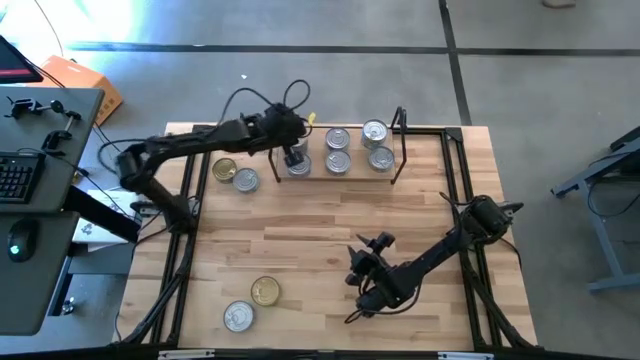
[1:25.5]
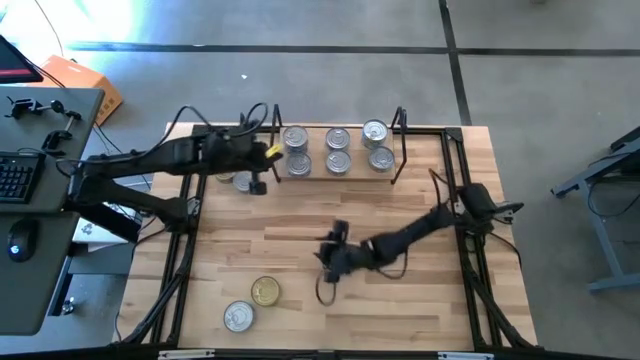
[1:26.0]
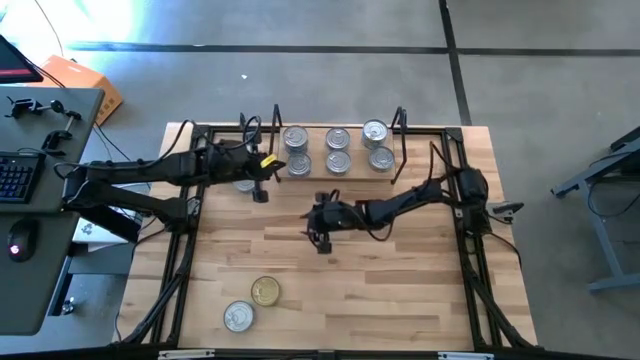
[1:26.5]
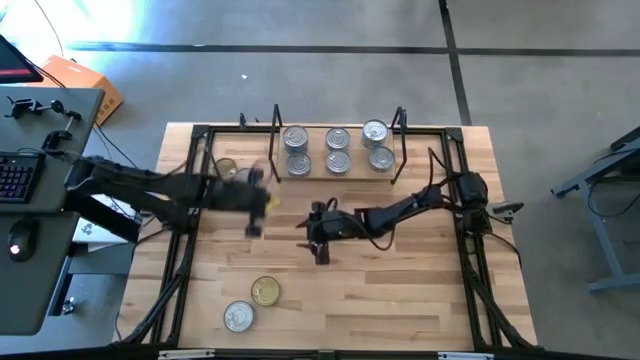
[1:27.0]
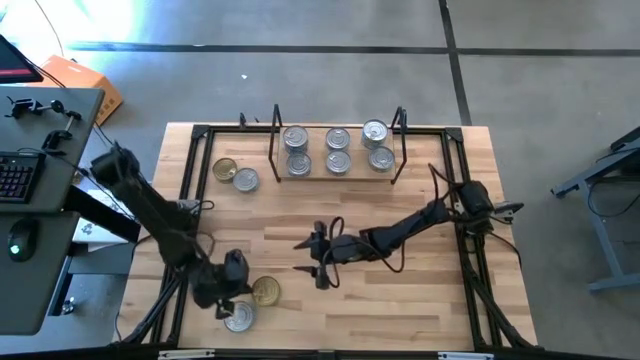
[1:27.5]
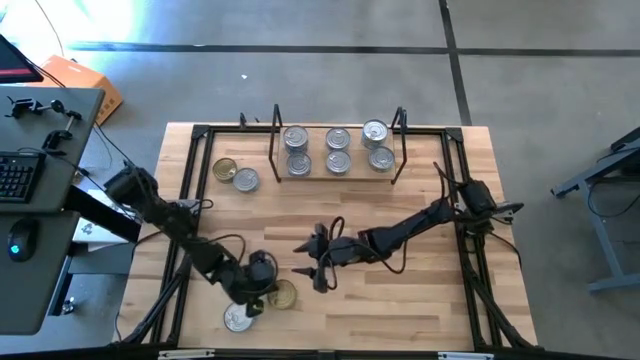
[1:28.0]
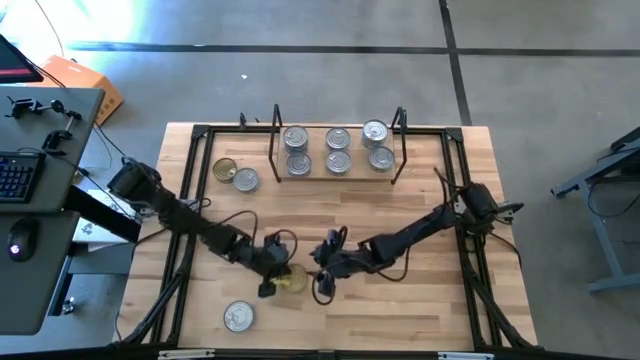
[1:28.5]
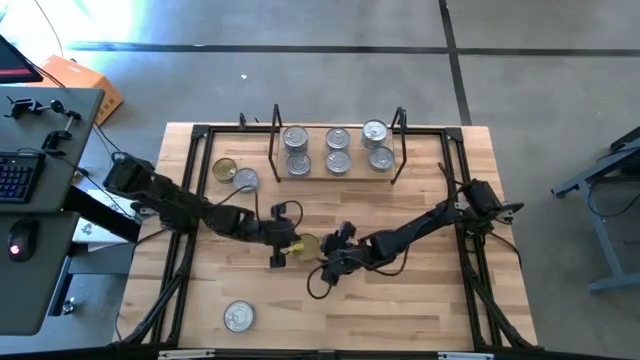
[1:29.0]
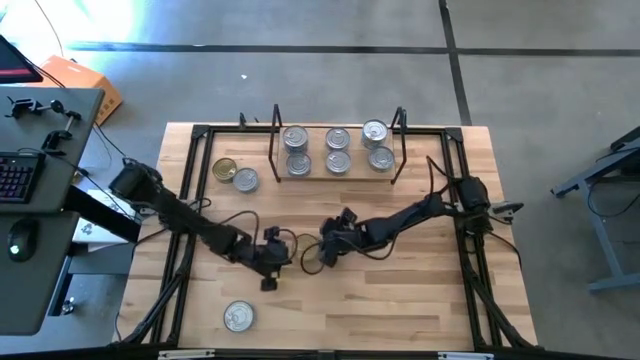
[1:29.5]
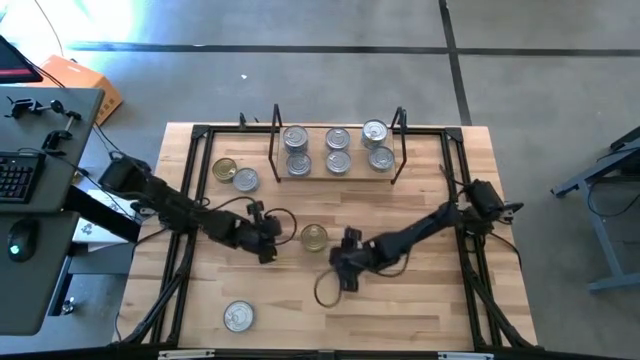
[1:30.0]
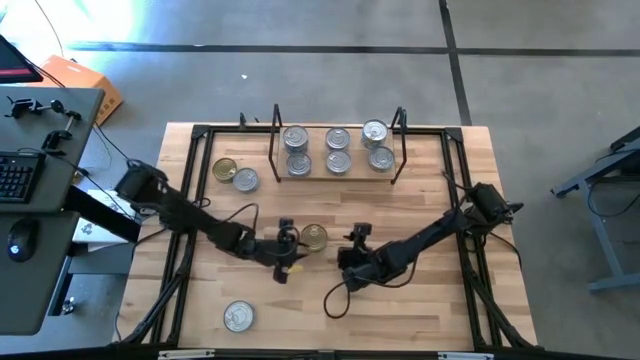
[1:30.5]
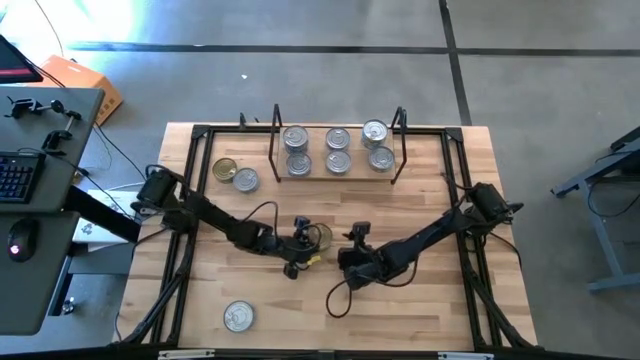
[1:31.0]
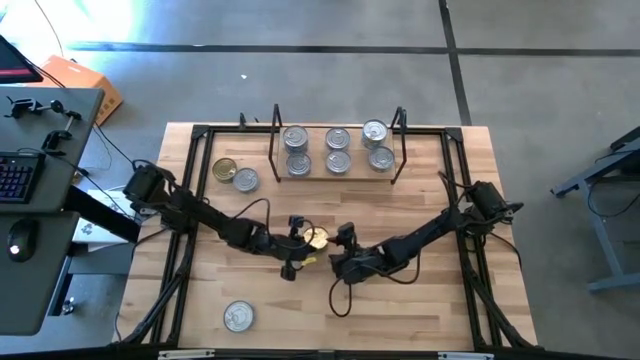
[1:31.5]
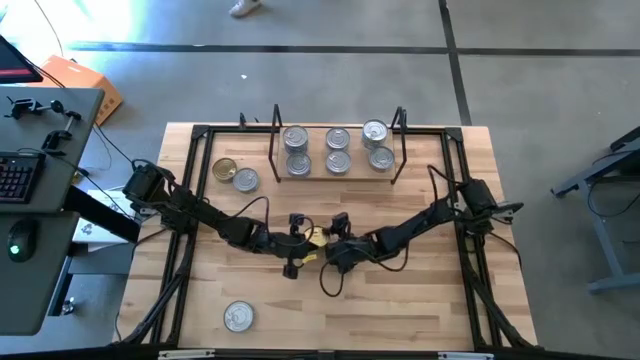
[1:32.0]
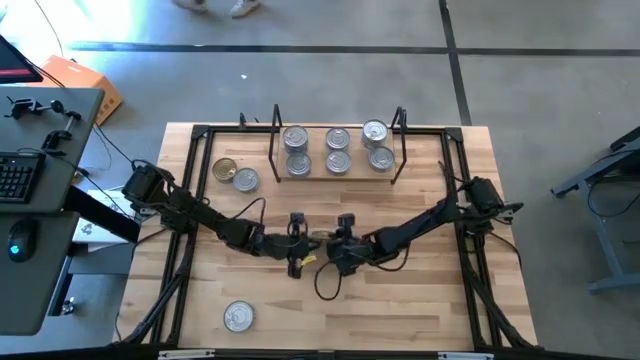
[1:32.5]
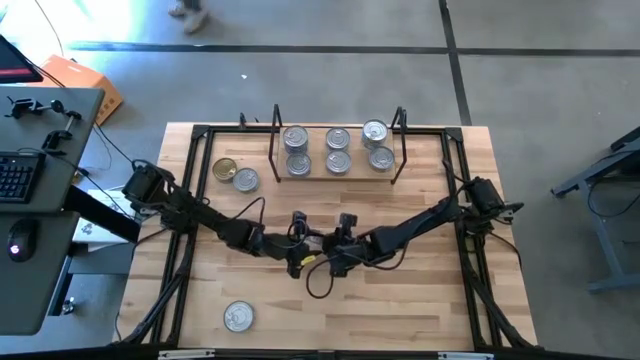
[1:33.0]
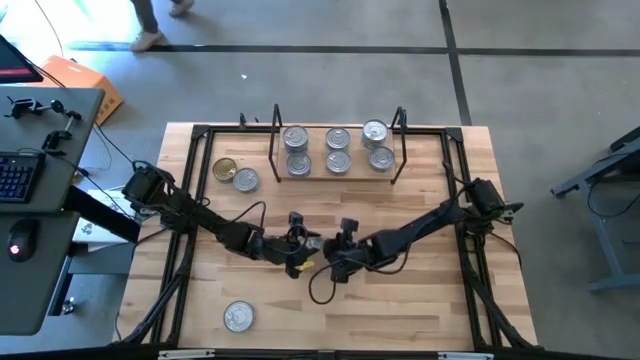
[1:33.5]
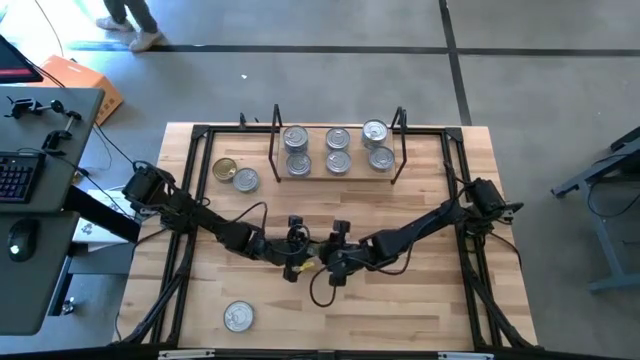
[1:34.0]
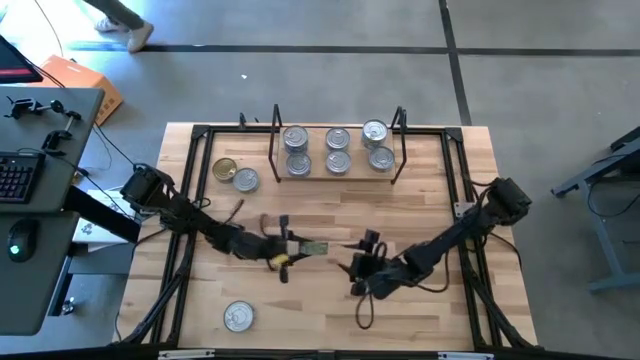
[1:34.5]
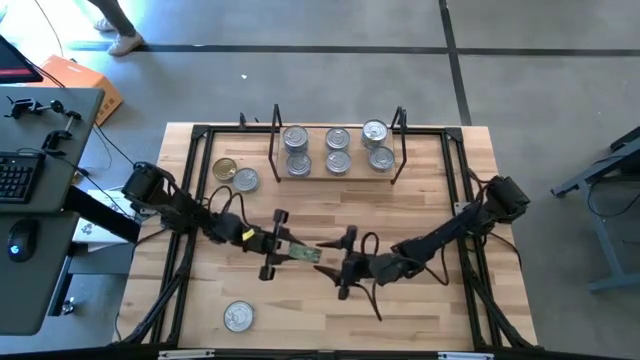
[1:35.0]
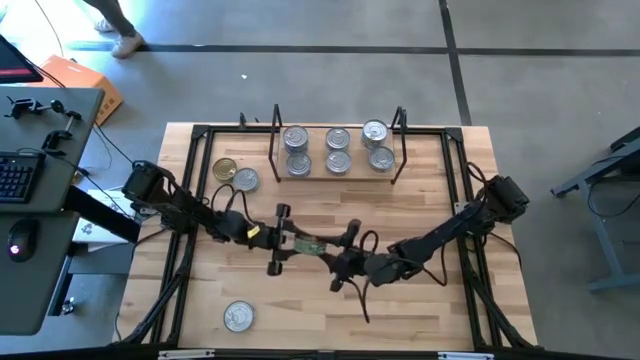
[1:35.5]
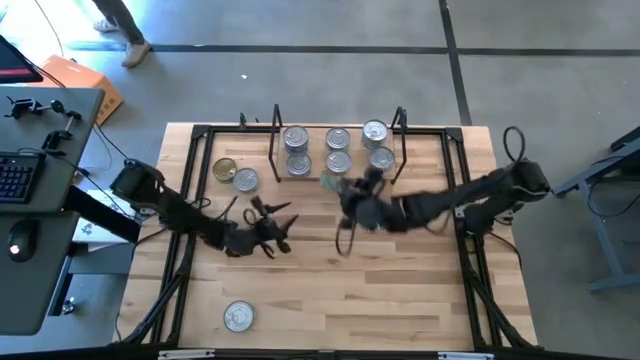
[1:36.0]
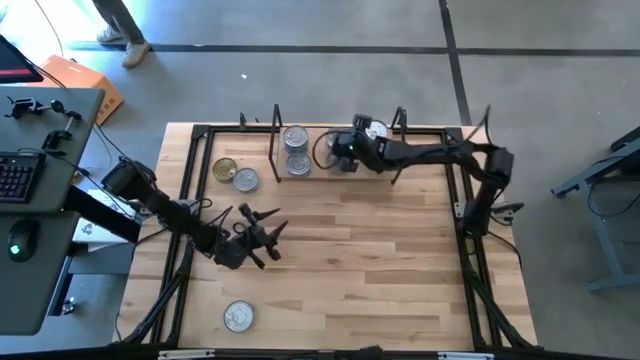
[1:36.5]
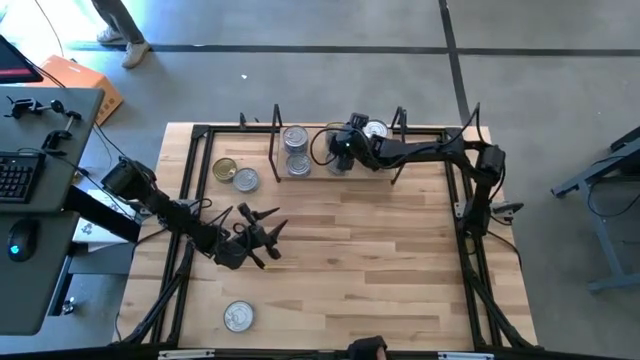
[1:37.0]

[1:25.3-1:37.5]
Task: Stack canned seafood by type on shelf
Stack the green tuna can on top of the green tuna can on the shelf

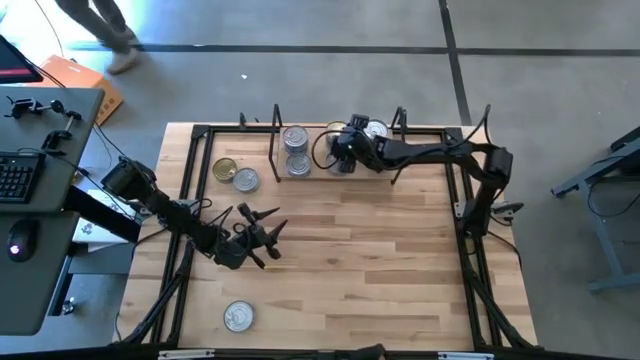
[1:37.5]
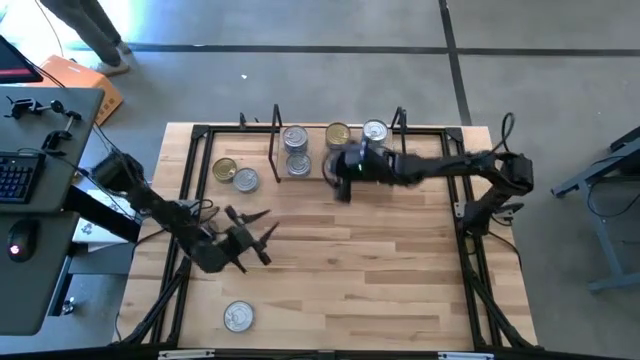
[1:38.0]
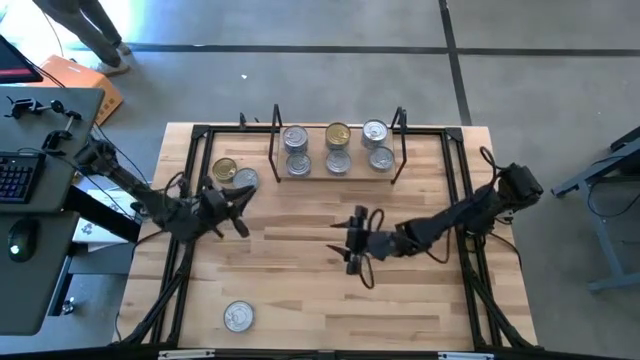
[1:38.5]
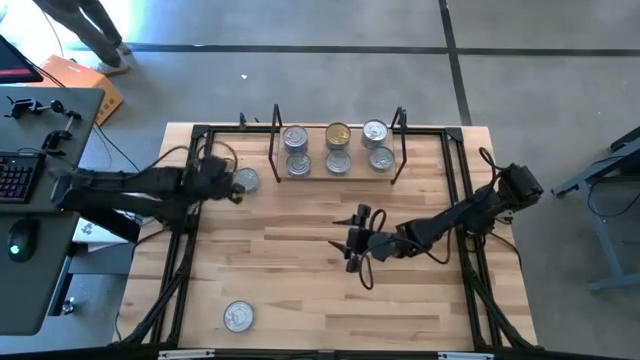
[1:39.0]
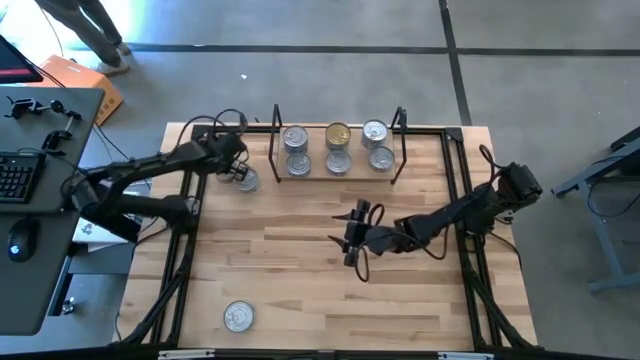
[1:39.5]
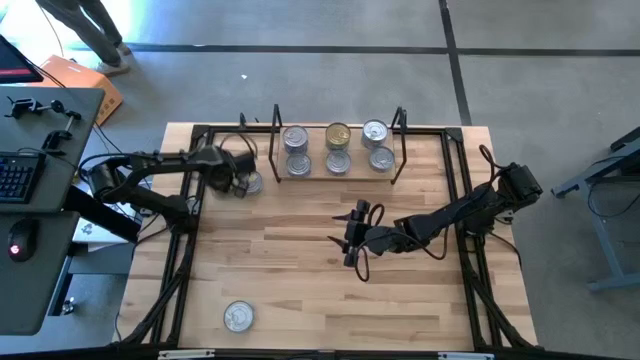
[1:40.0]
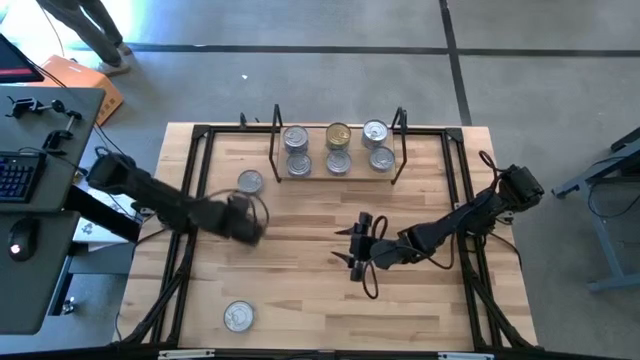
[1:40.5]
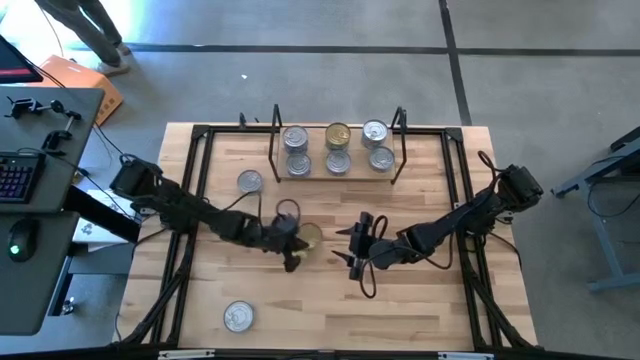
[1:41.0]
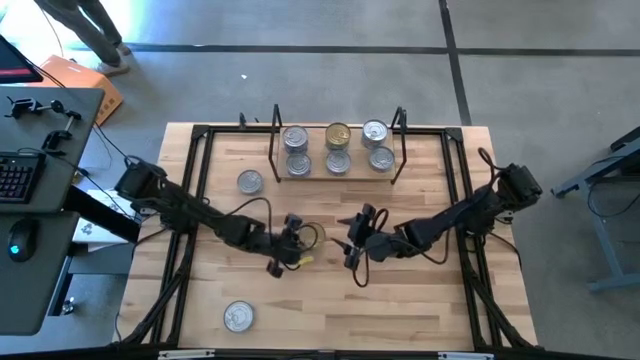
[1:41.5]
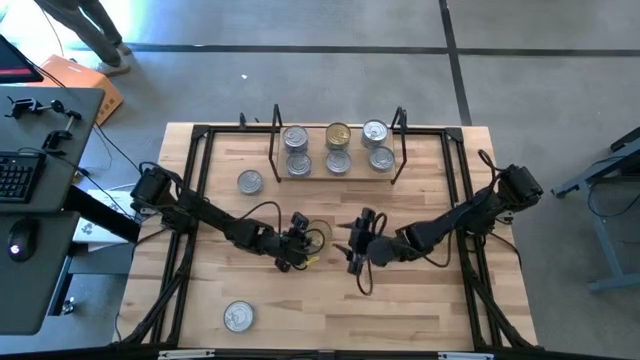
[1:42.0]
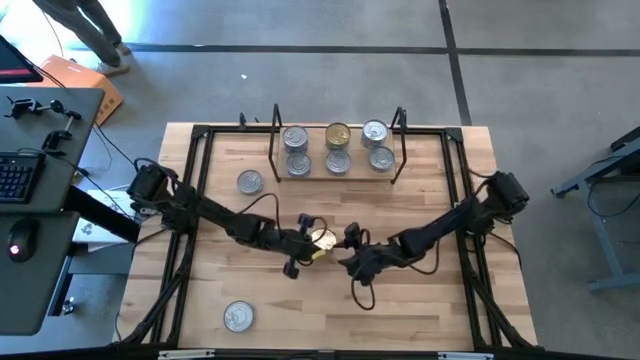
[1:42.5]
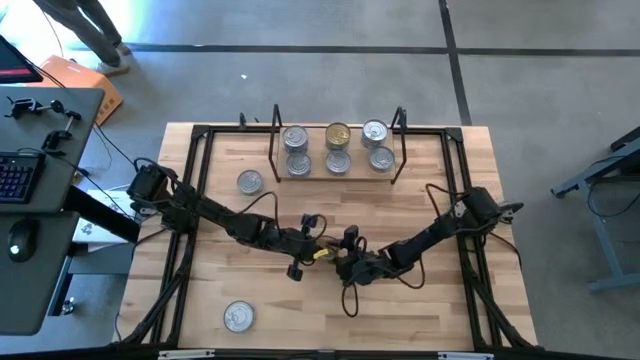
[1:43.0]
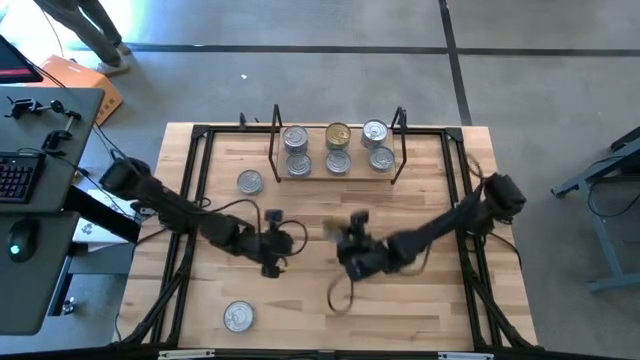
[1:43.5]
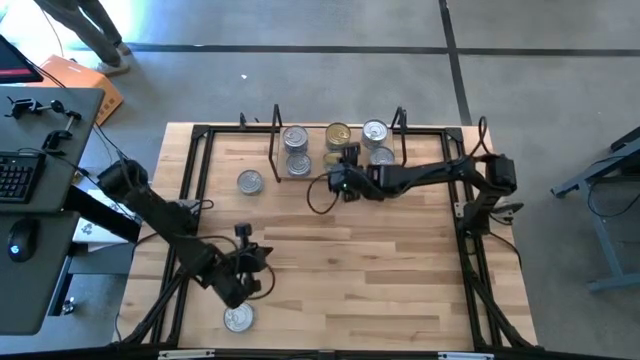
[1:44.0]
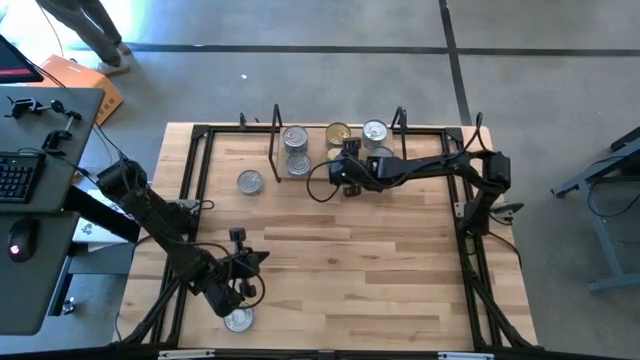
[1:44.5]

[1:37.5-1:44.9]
Stack the green tuna can on top of the green tuna can on the shelf

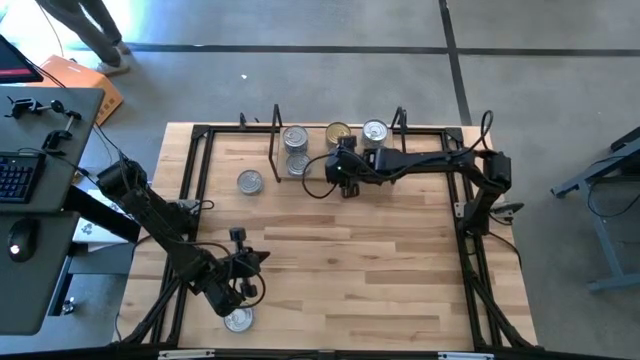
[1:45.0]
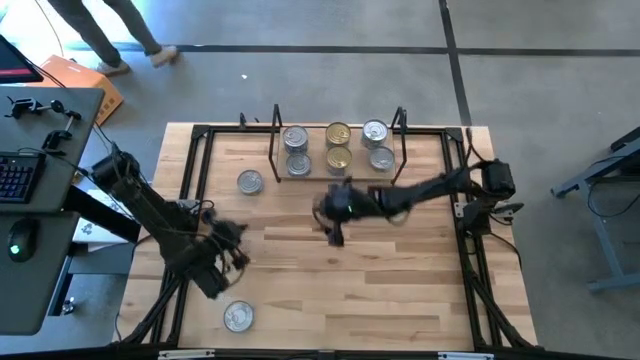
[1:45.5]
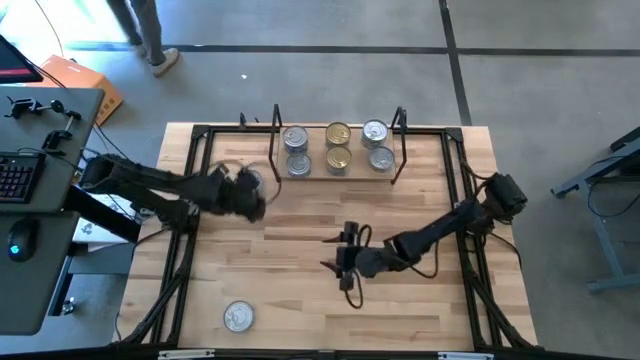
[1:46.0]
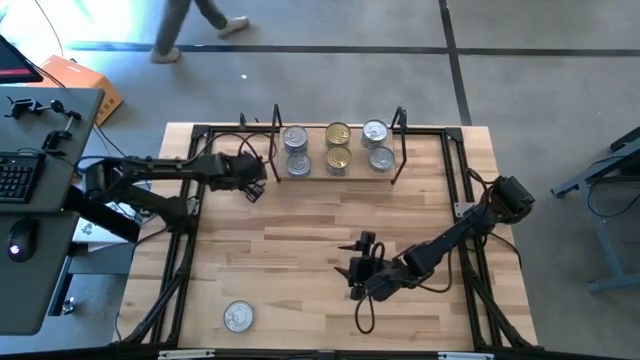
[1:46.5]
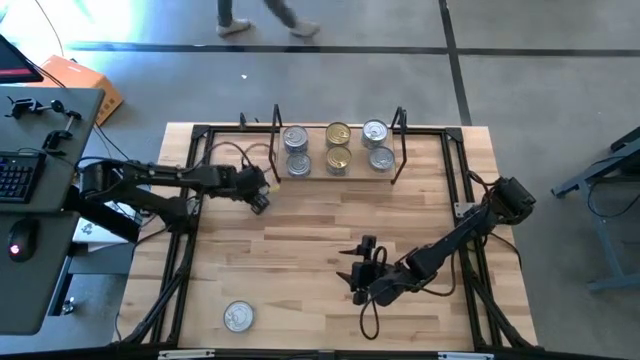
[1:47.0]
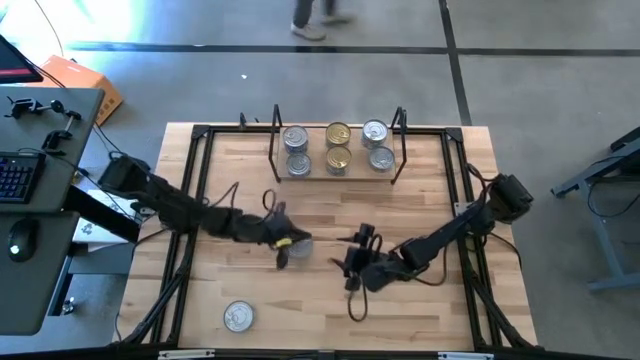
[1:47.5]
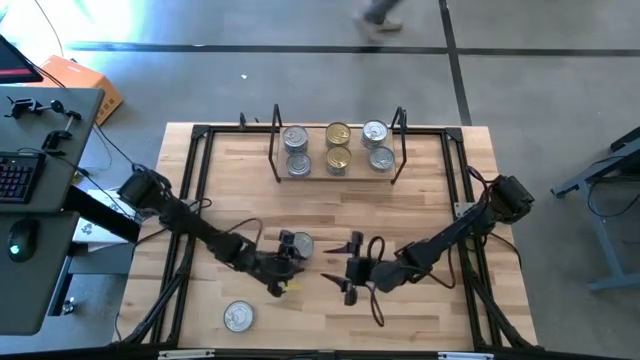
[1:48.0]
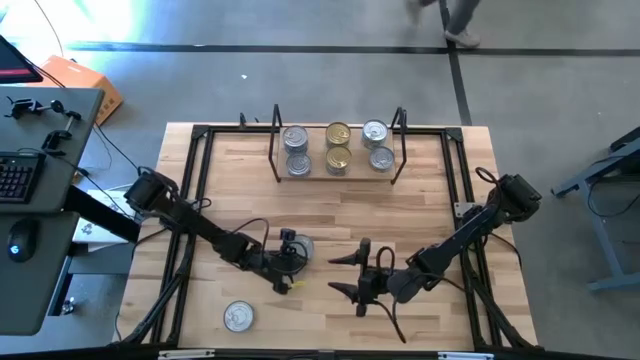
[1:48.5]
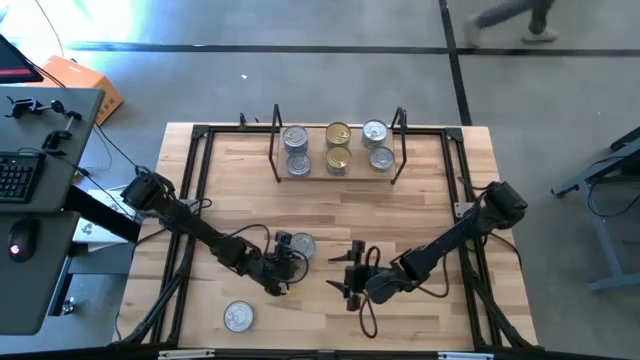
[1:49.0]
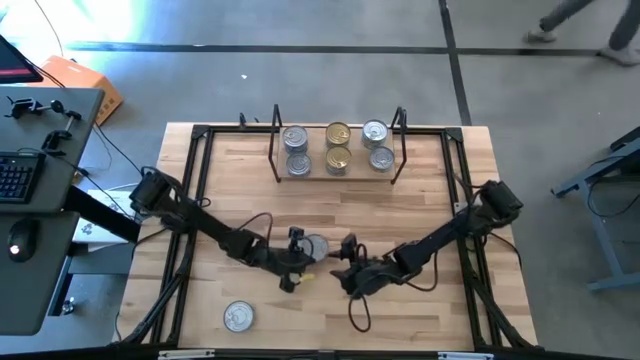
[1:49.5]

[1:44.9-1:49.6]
Stack the yellow and blue tuna can on top of the yellow and blue tuna can on the shelf
